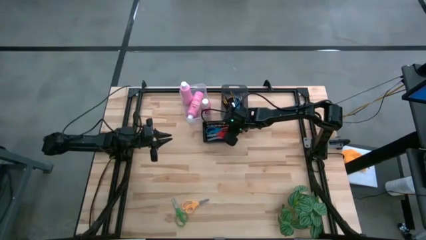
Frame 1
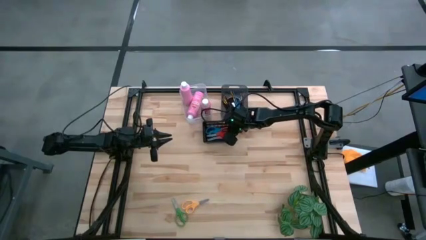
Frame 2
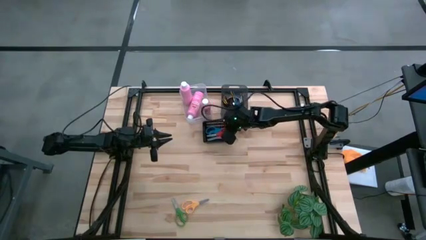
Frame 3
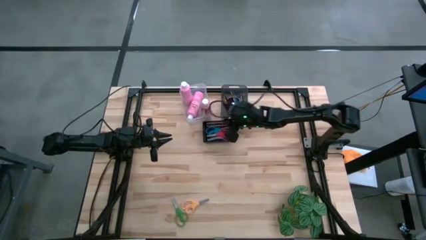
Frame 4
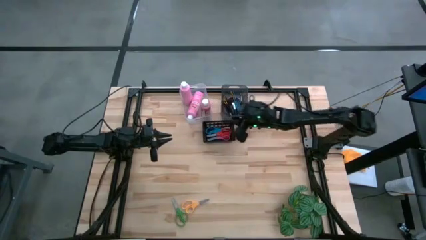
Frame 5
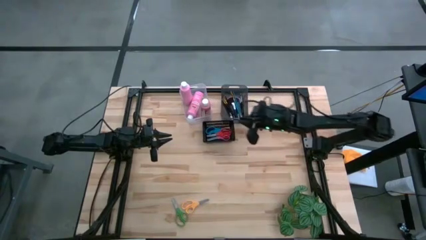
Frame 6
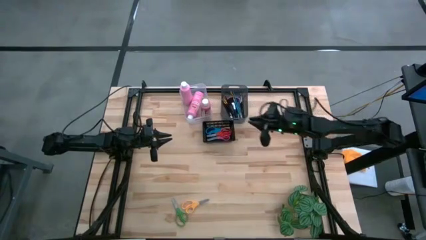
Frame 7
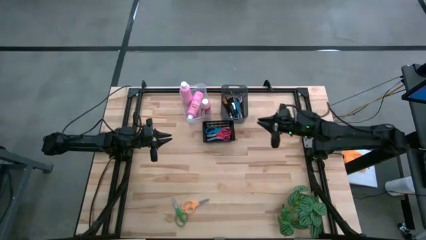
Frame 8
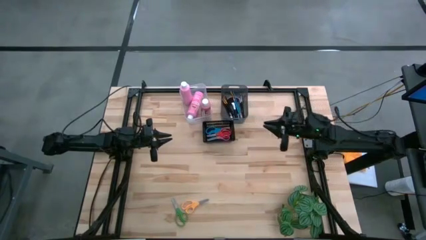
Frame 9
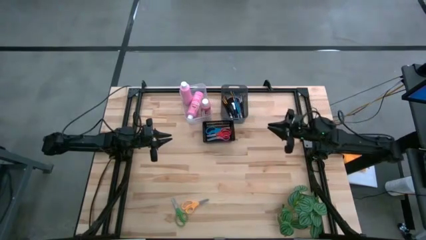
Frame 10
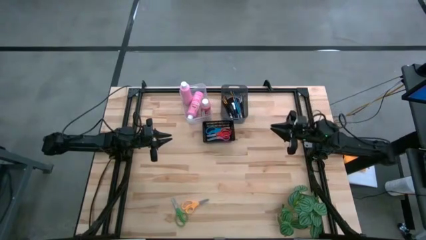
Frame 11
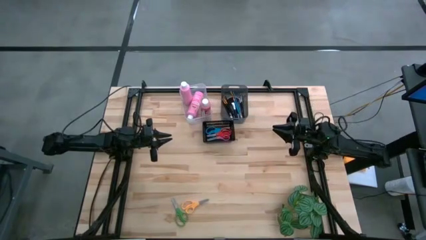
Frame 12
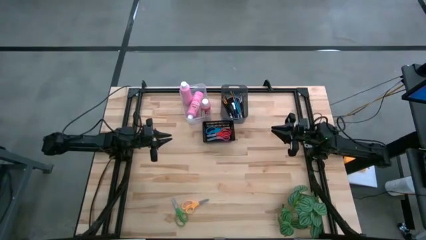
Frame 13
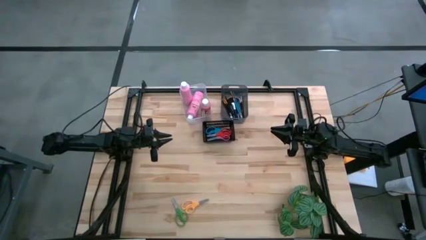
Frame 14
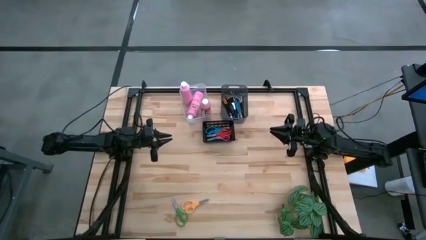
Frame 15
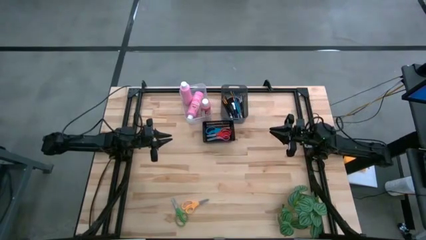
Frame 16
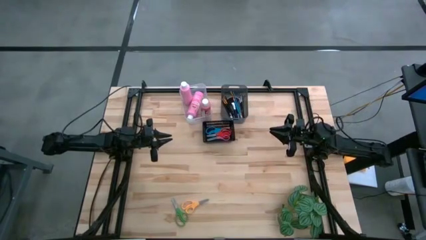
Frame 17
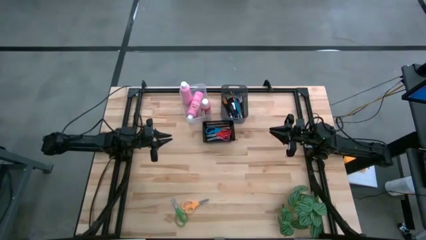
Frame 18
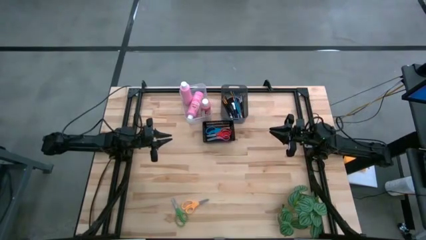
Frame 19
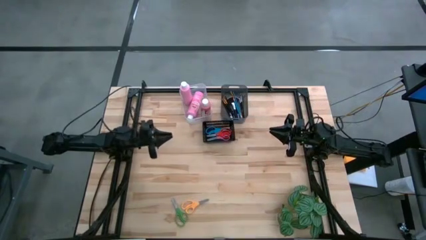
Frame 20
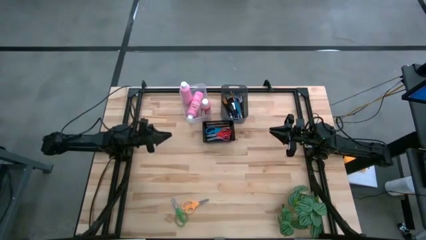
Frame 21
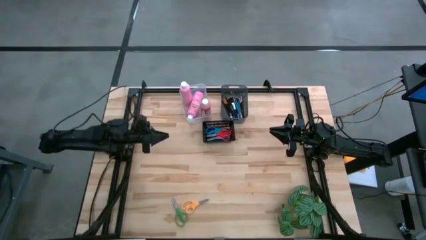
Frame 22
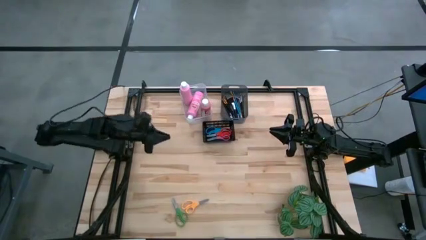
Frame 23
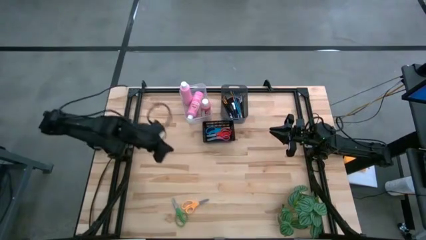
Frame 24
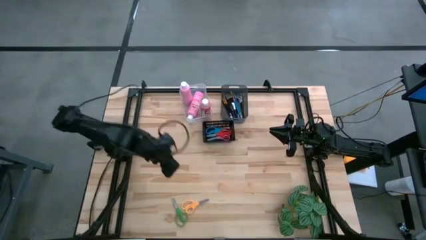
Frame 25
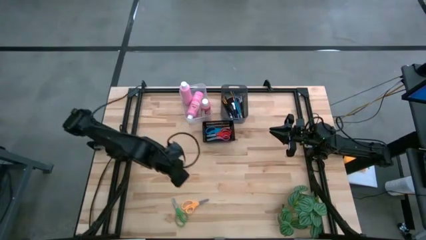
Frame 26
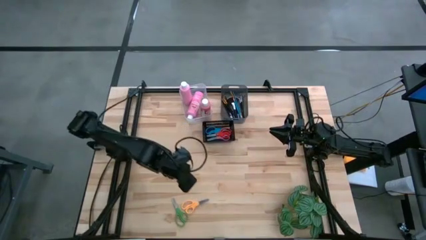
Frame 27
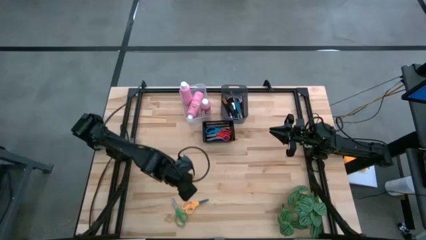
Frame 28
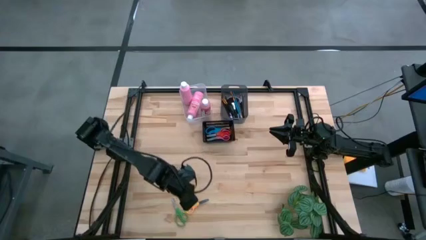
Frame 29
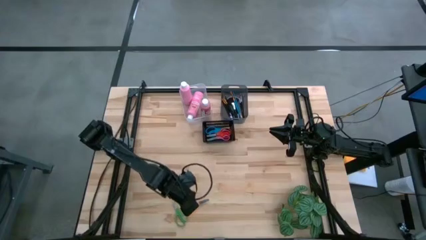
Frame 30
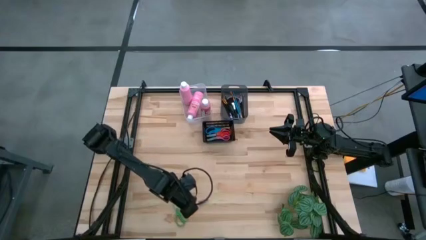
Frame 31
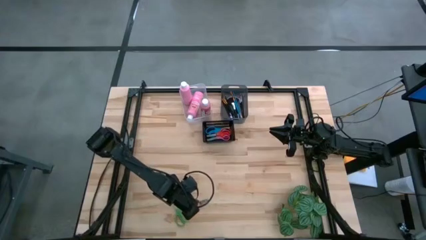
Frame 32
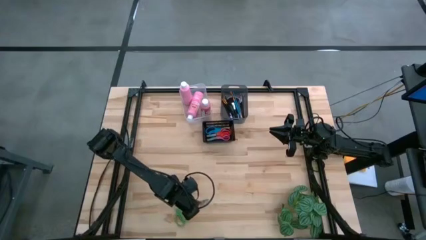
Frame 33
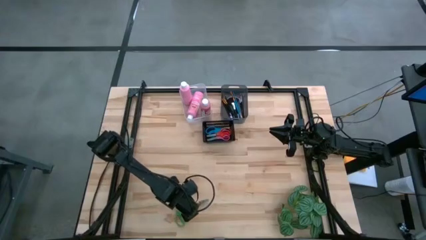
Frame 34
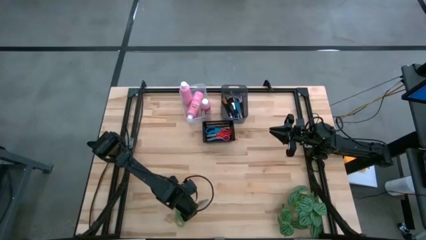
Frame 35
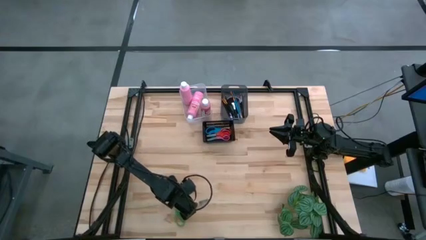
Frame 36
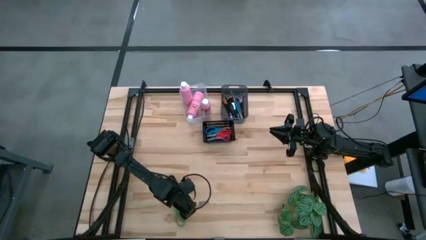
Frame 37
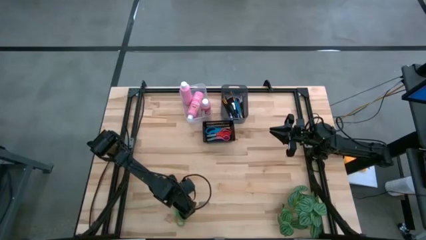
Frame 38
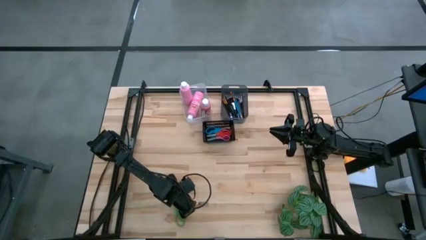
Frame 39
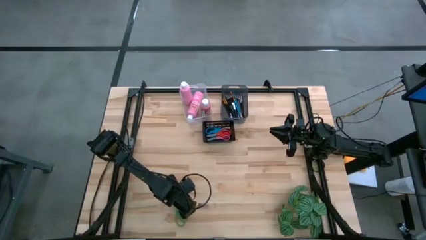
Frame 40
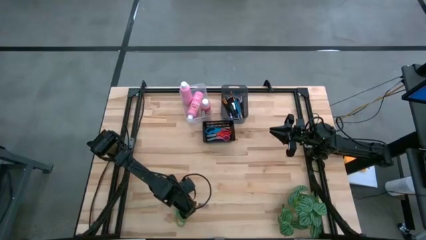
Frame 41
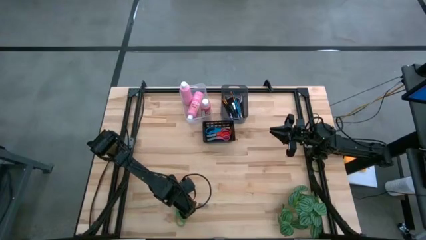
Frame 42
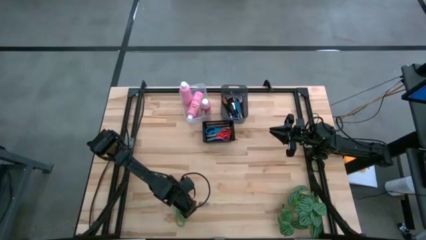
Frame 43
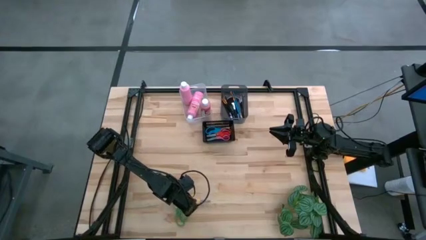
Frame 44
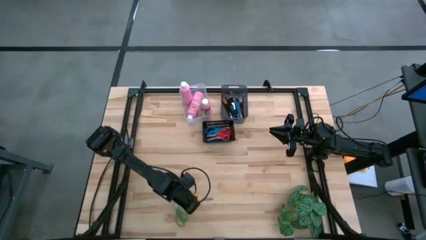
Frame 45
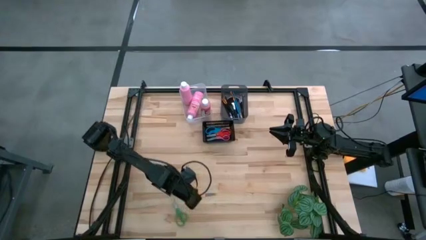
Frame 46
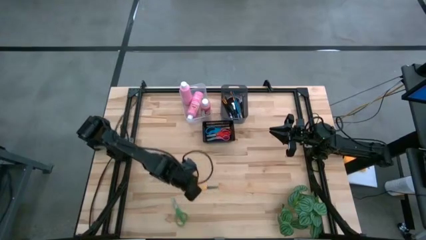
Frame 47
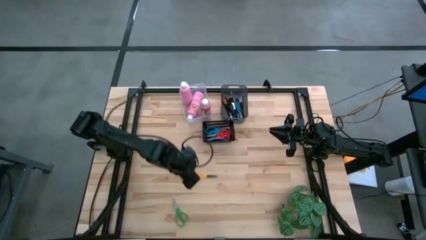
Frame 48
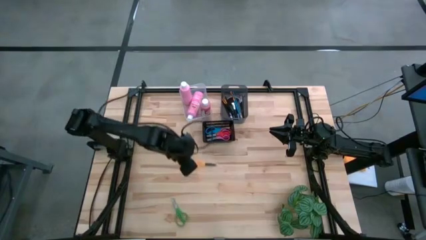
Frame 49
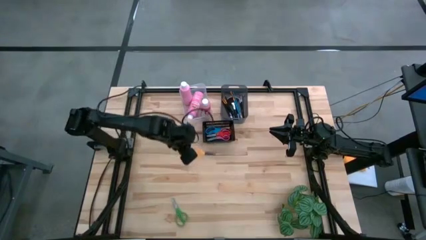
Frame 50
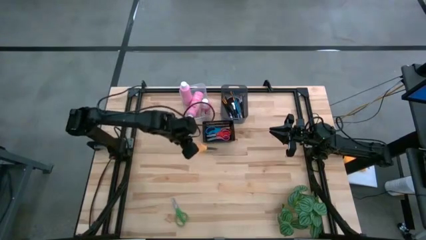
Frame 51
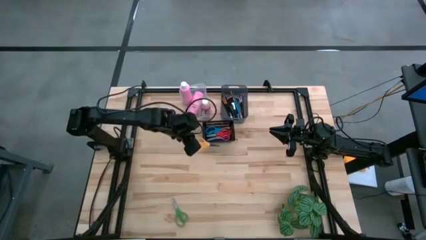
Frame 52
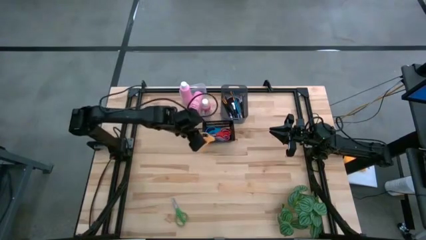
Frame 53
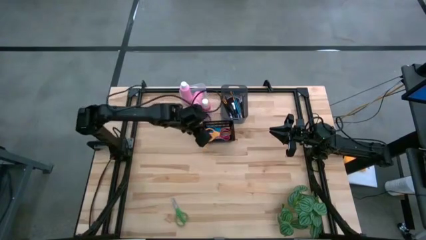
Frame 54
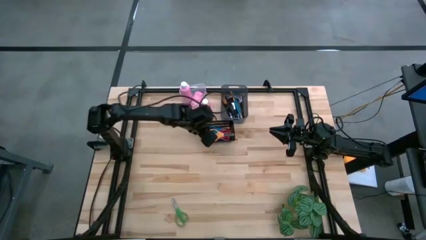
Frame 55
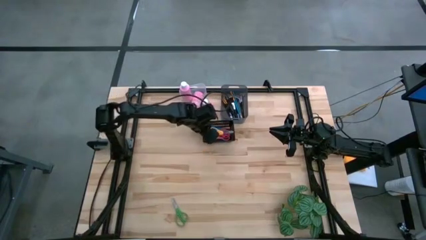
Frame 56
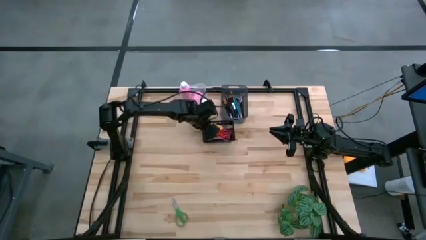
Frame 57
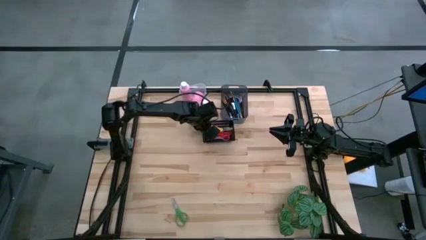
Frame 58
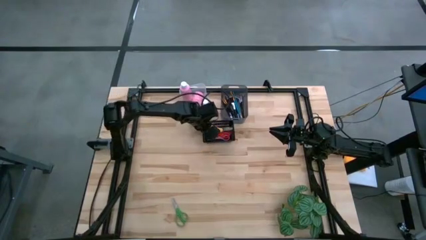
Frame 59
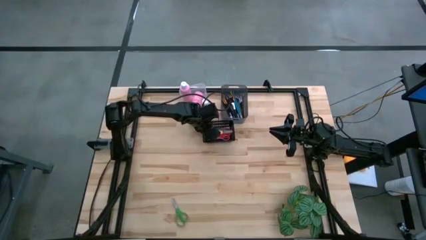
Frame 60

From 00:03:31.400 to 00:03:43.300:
Task: Pick & Place Paint Supplies
Put the yellow scissors into the black bin

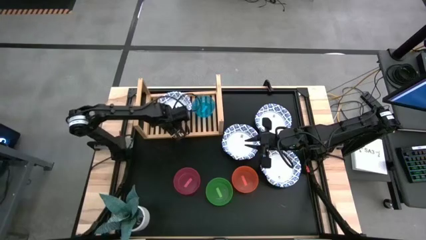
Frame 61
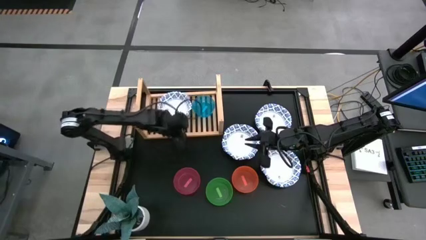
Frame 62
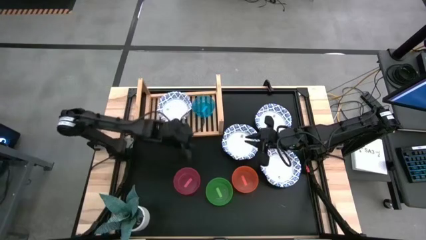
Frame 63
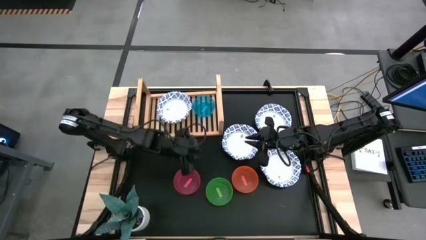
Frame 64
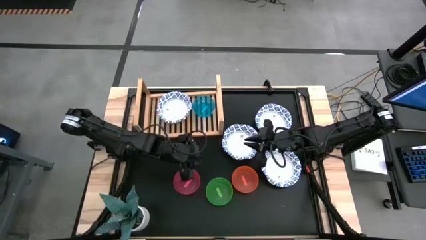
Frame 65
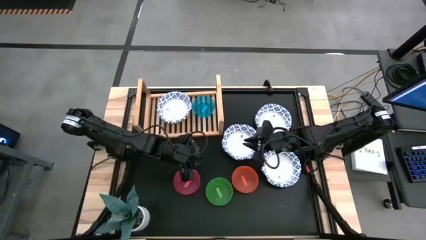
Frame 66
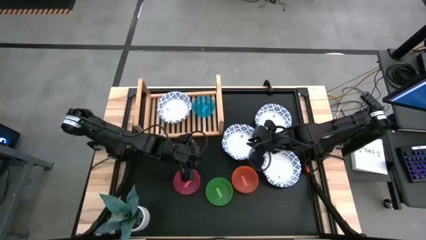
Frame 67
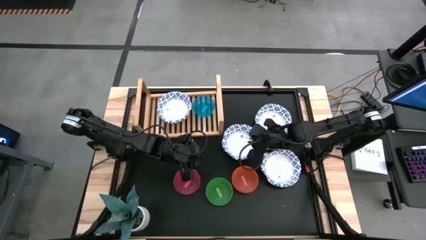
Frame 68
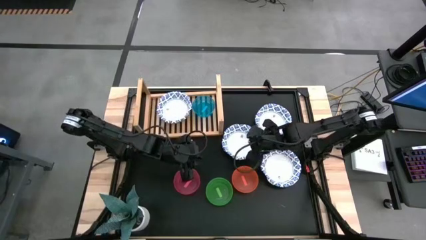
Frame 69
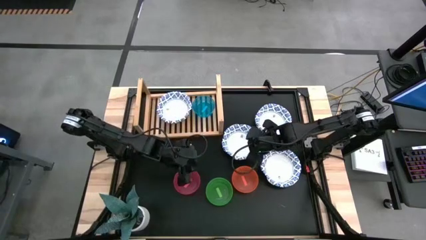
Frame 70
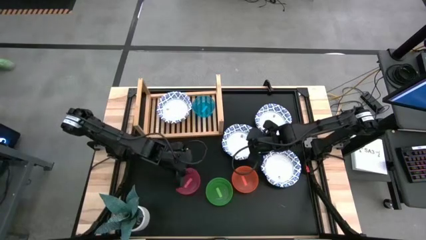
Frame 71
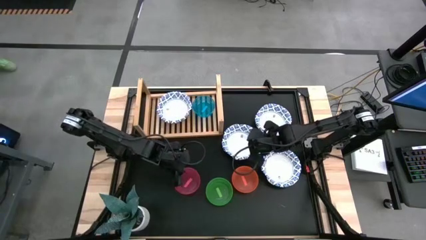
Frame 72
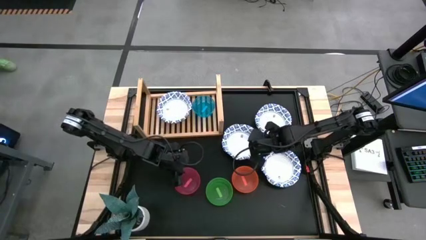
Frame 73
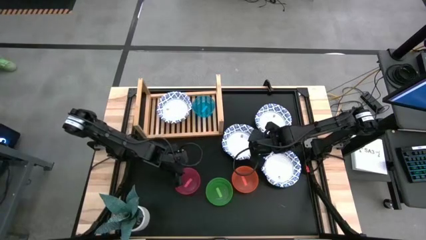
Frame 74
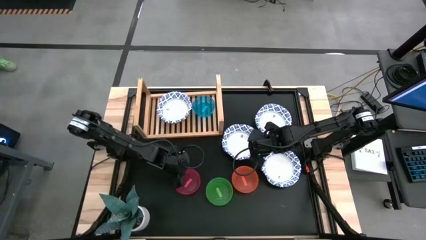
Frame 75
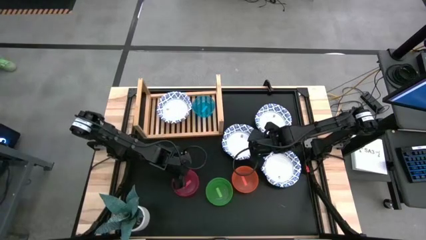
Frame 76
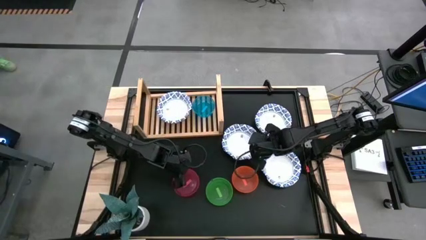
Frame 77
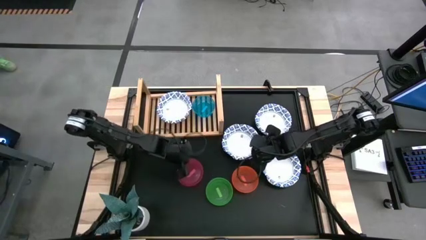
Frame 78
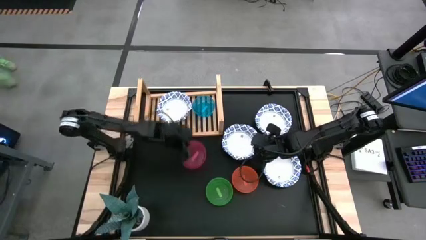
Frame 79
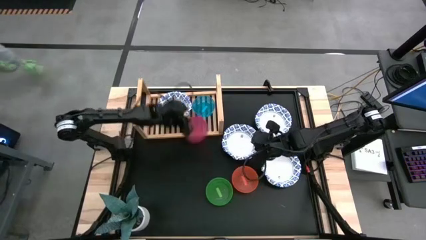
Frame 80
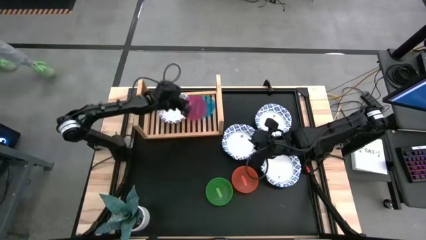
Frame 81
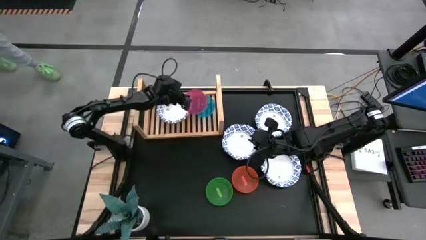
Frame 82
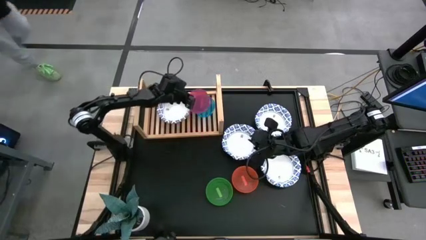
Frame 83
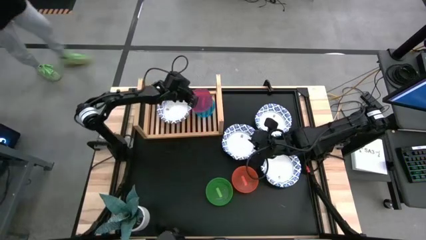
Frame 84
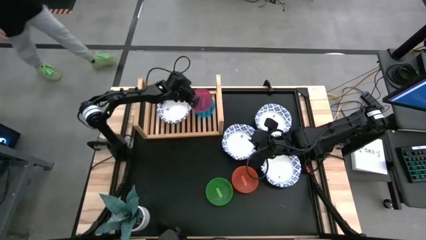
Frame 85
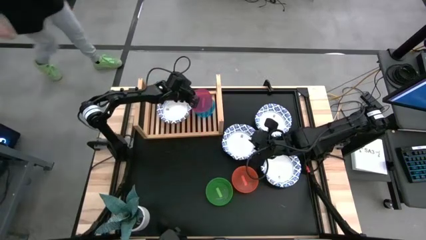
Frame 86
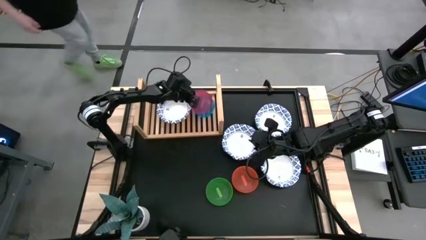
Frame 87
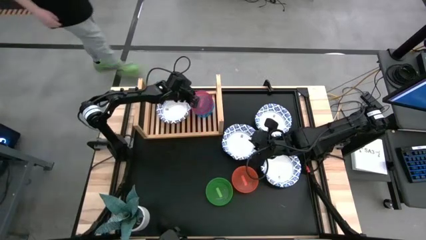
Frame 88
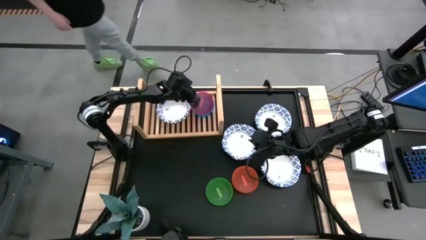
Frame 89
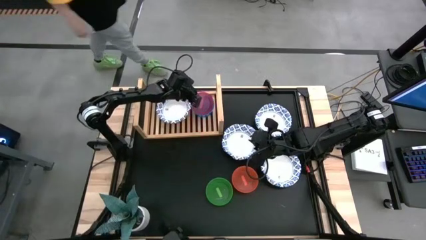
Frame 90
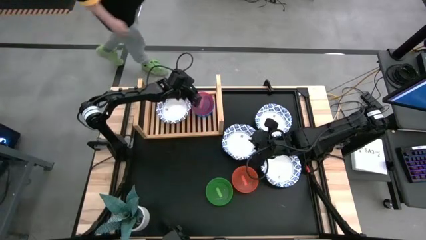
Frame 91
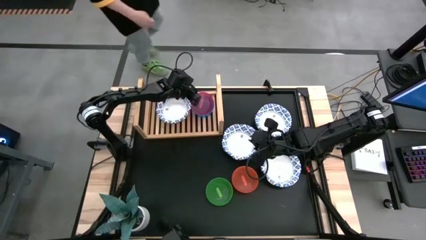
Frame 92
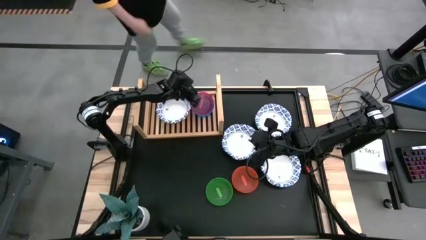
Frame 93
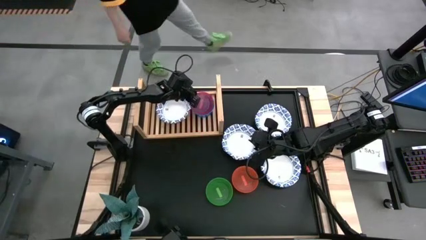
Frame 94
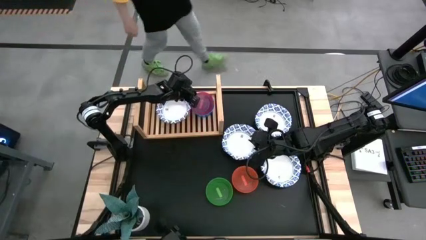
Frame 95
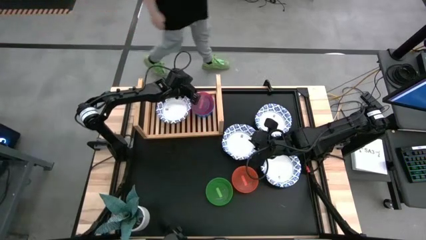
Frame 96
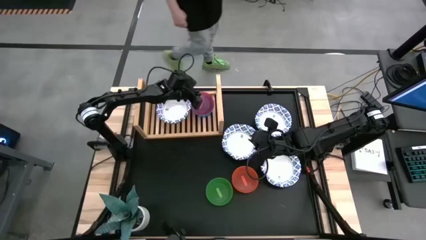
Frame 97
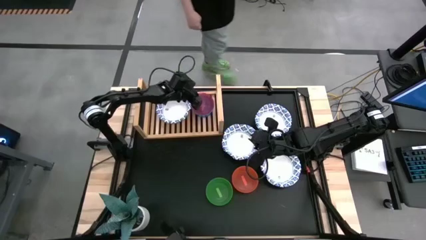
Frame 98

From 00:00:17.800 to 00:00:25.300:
Task: Place and stack bowls onto a shelf
Stack the pink bowl on top of the blue bowl on the shelf
